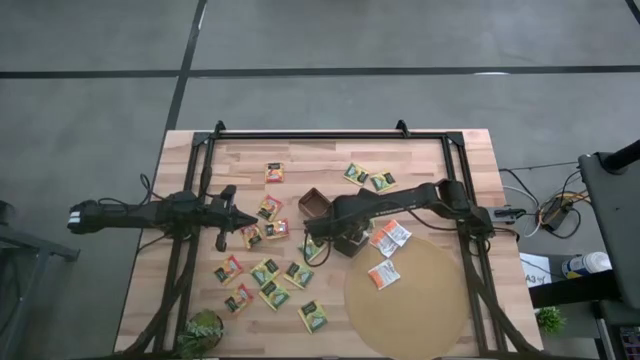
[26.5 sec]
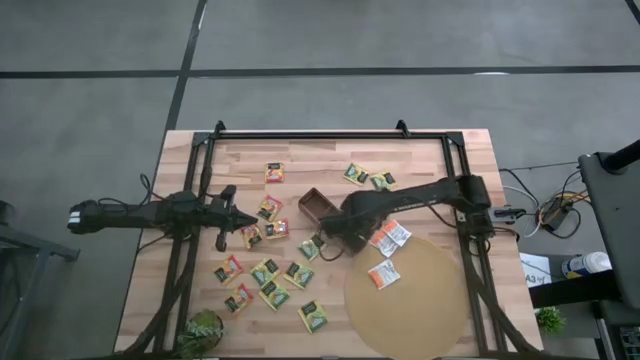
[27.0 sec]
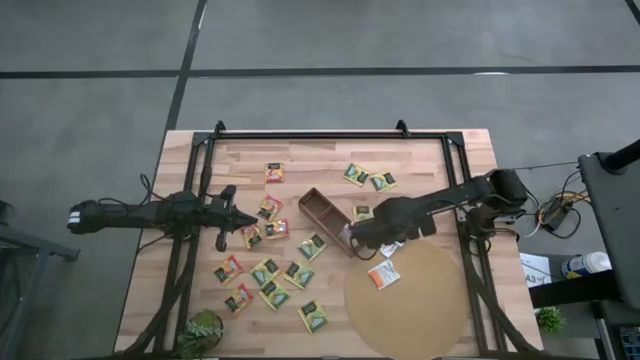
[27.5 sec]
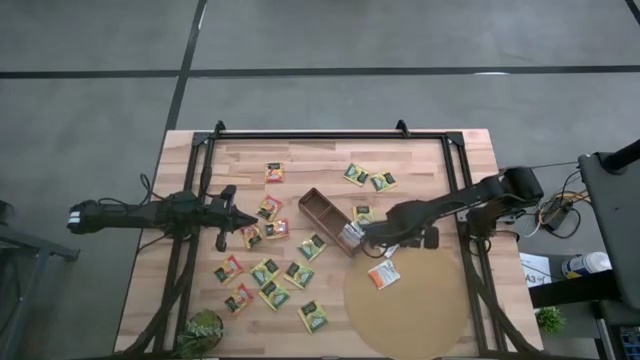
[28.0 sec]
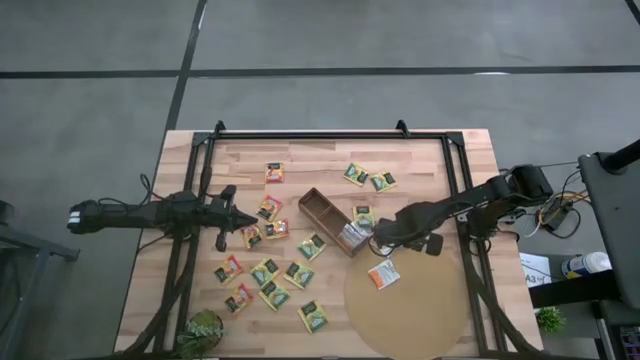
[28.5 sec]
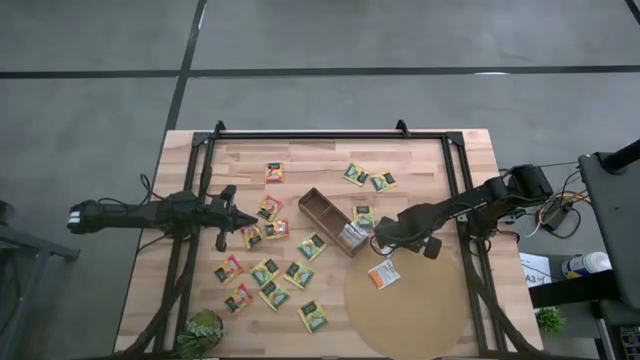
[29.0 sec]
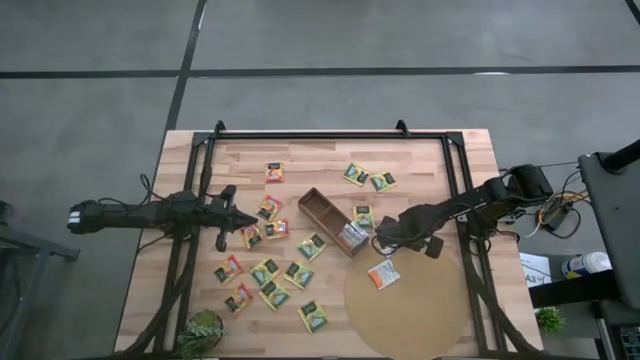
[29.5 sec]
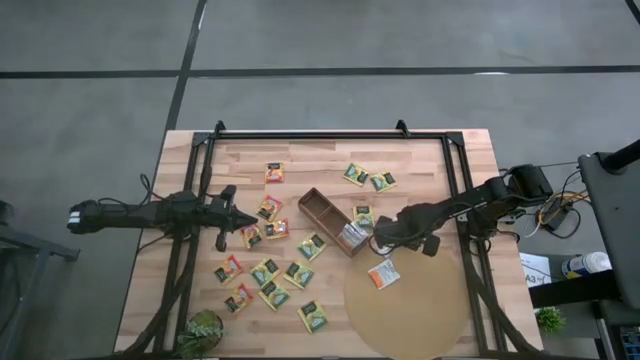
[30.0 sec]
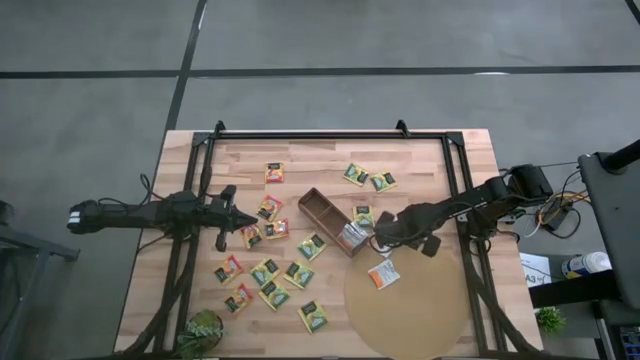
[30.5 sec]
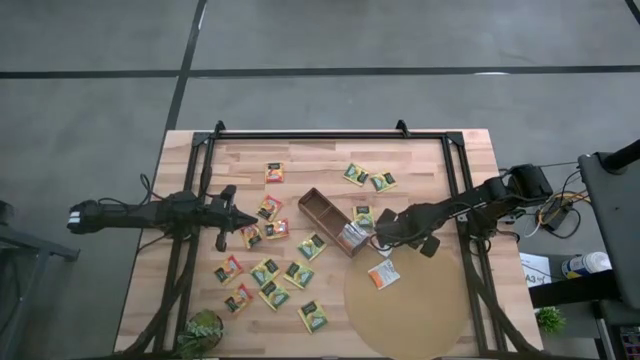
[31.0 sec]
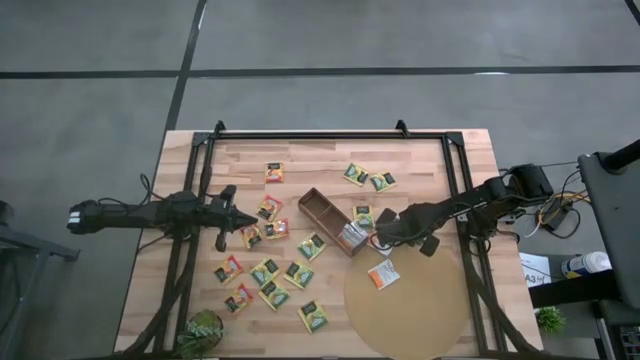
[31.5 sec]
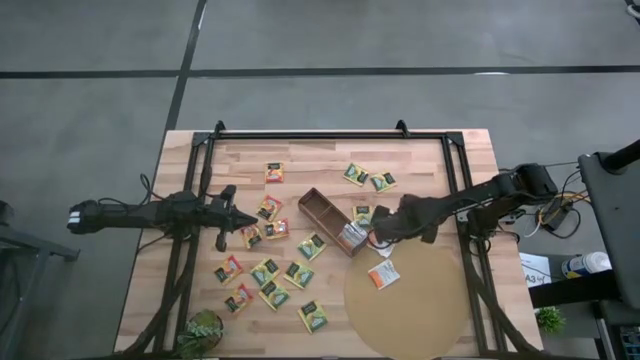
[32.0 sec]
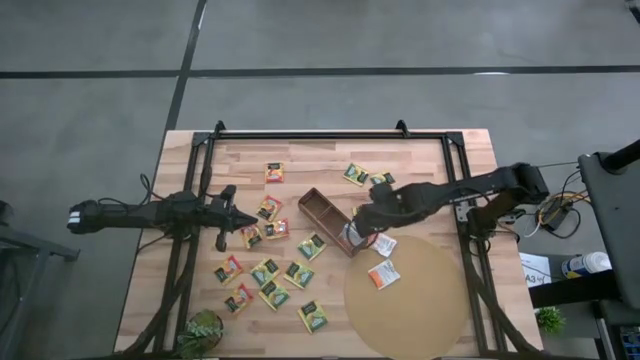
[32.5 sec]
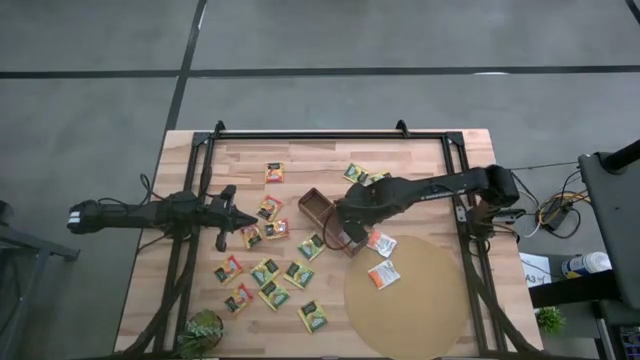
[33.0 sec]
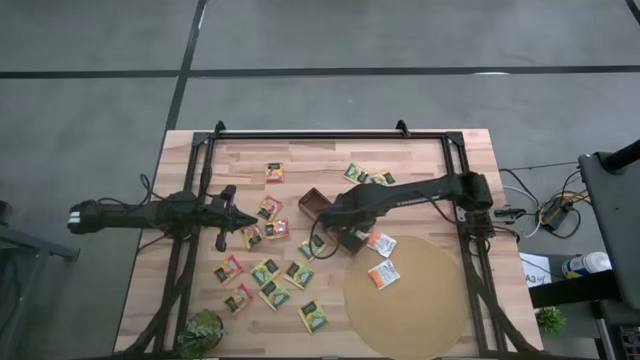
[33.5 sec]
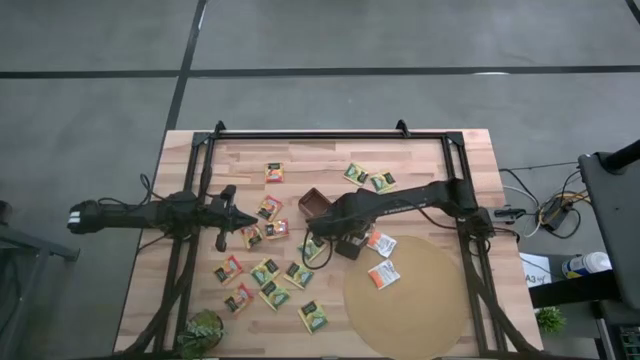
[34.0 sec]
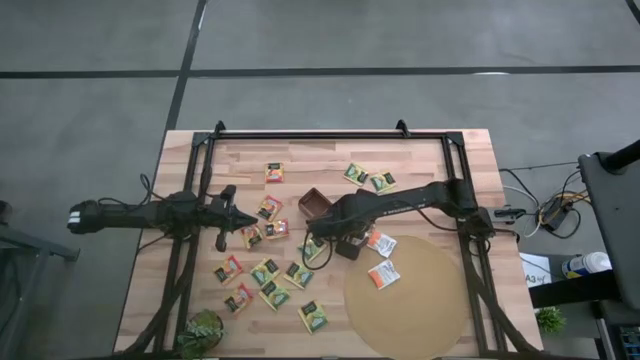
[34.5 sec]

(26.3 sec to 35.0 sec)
Task: Pick & Place Tea
Put the white tea bag into the right section of the wooden organizer

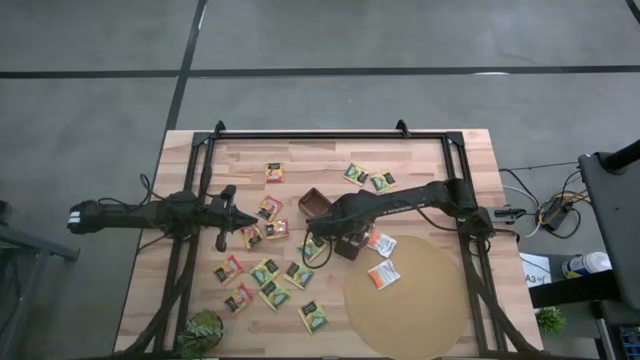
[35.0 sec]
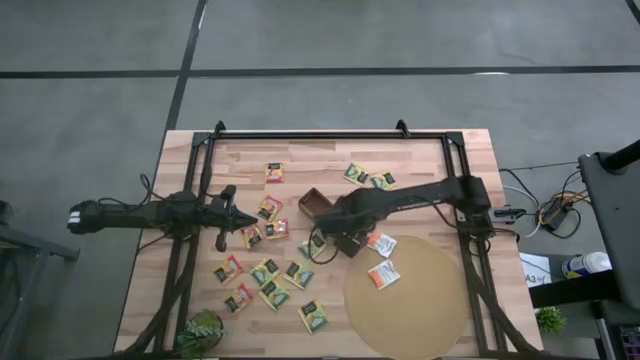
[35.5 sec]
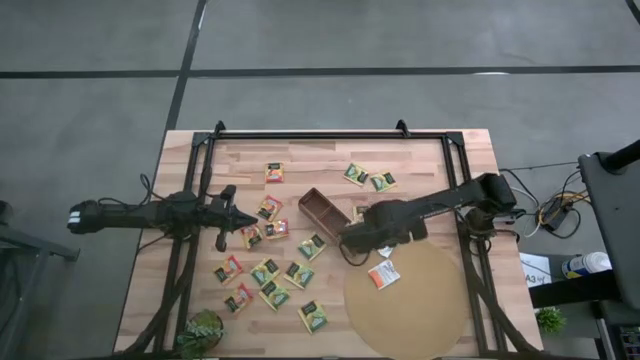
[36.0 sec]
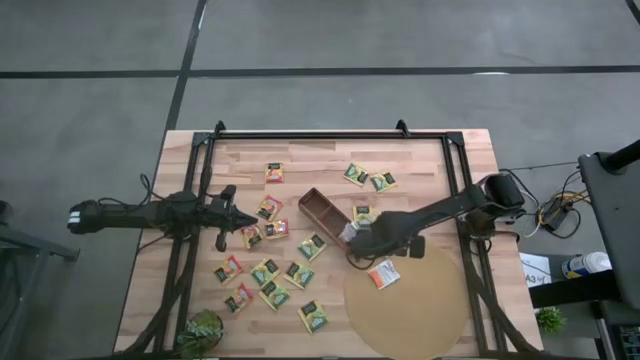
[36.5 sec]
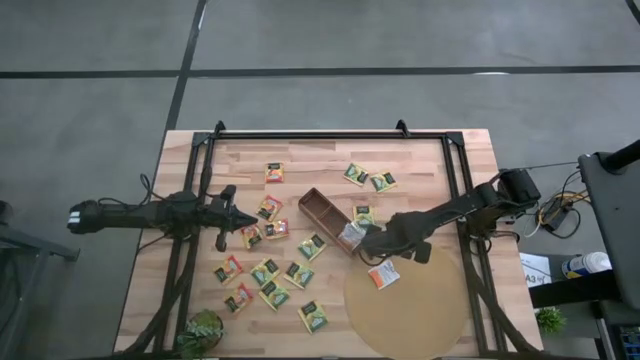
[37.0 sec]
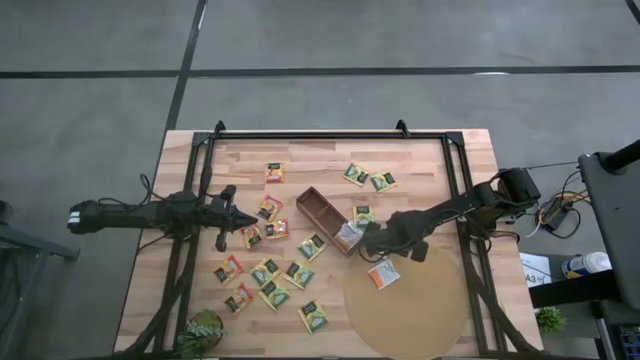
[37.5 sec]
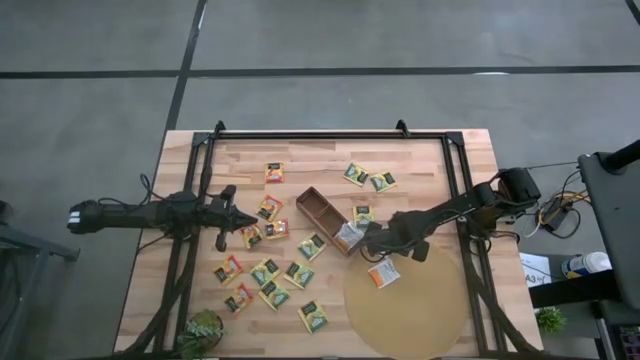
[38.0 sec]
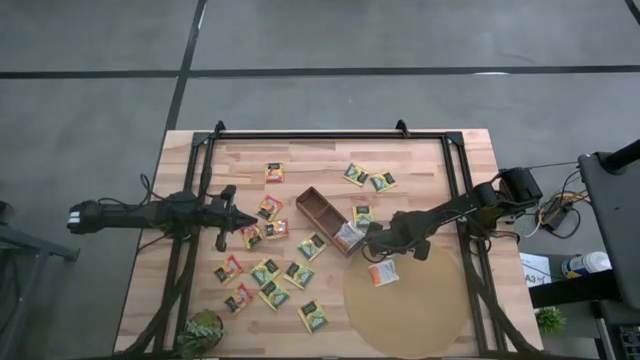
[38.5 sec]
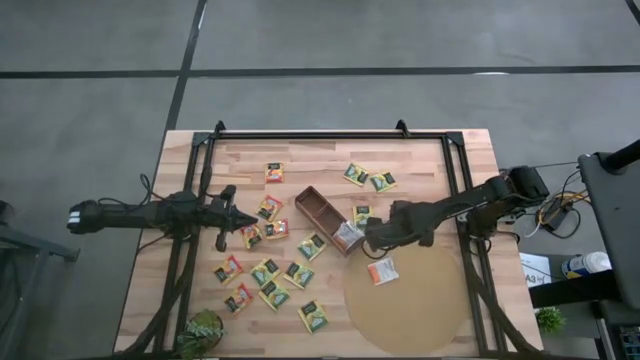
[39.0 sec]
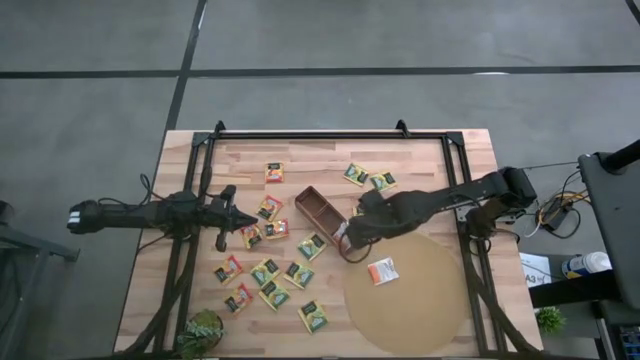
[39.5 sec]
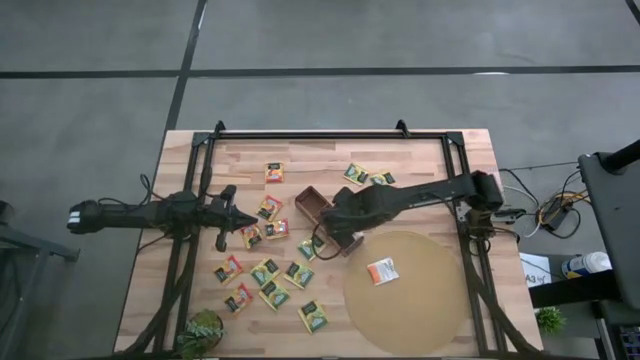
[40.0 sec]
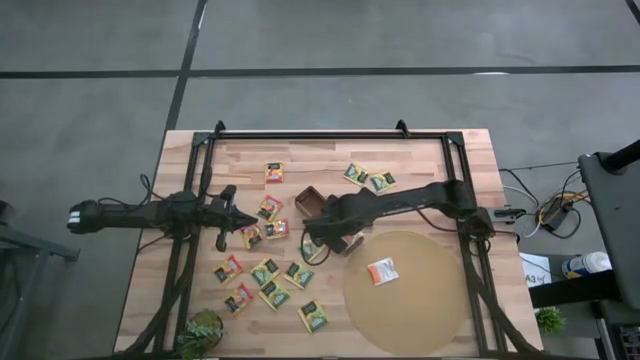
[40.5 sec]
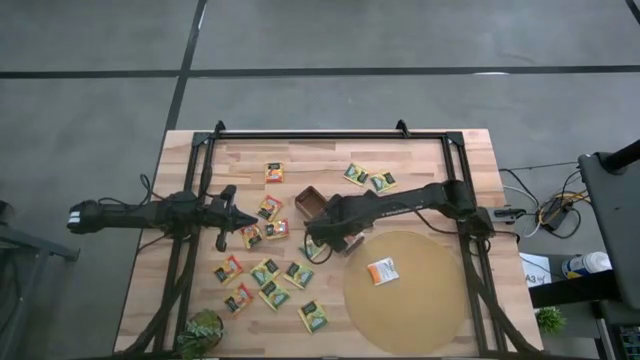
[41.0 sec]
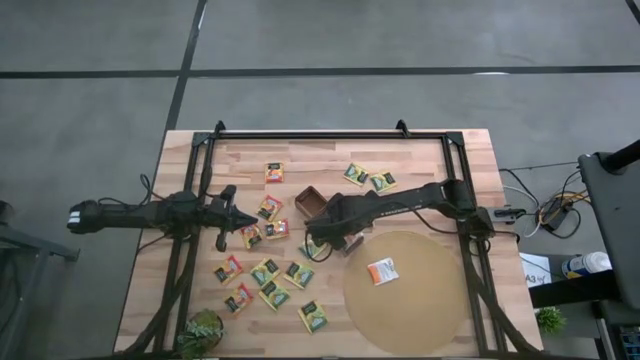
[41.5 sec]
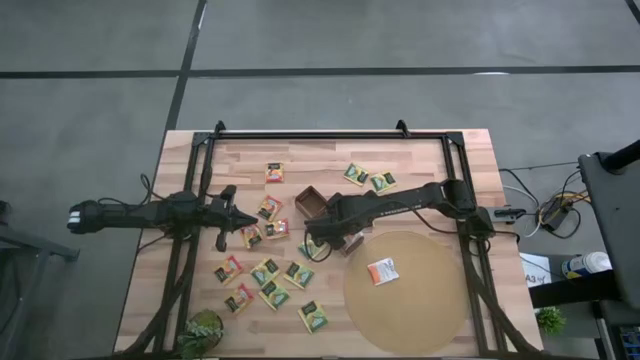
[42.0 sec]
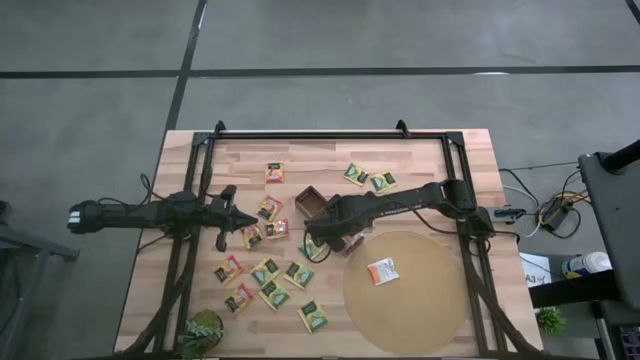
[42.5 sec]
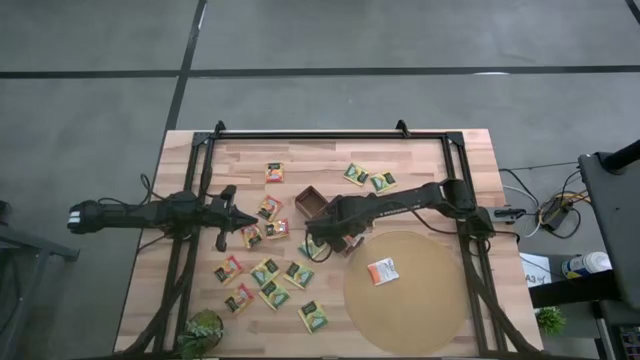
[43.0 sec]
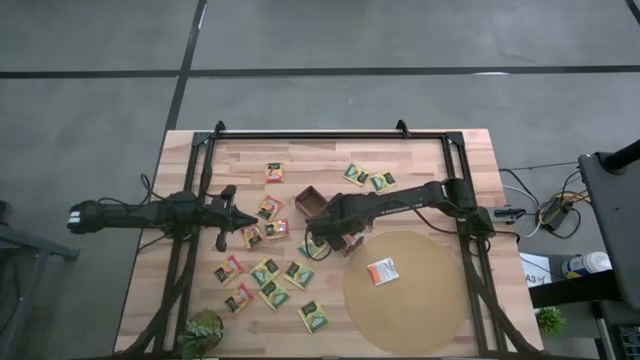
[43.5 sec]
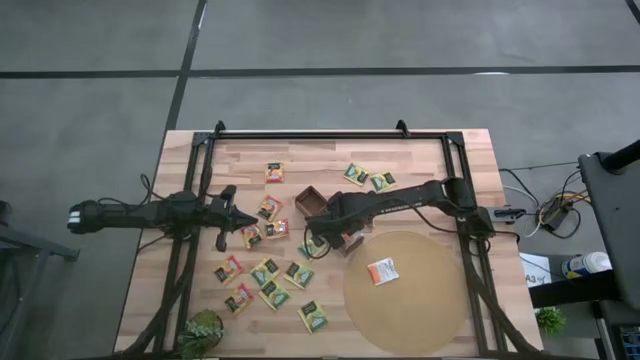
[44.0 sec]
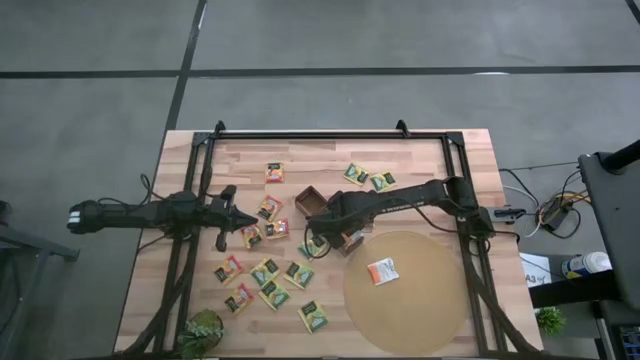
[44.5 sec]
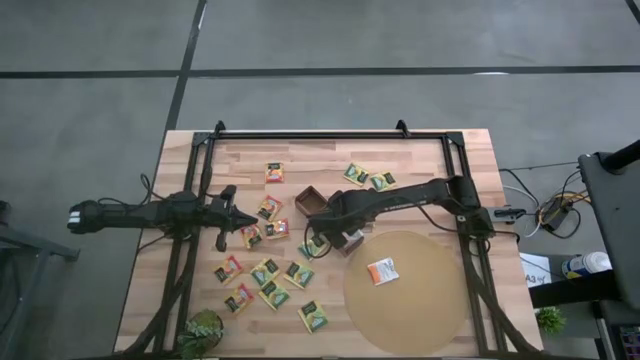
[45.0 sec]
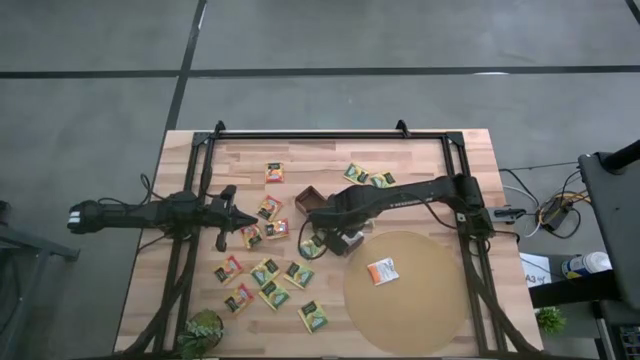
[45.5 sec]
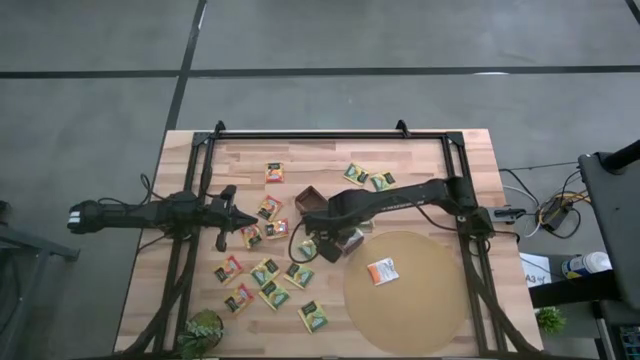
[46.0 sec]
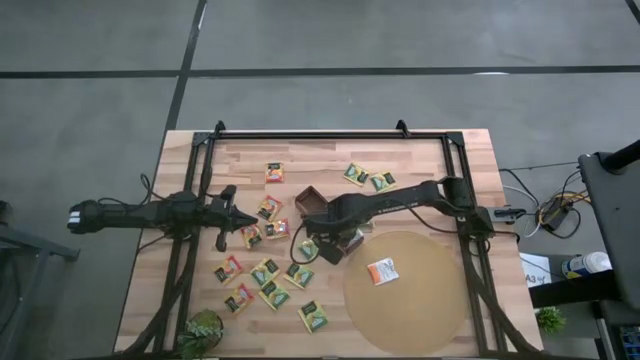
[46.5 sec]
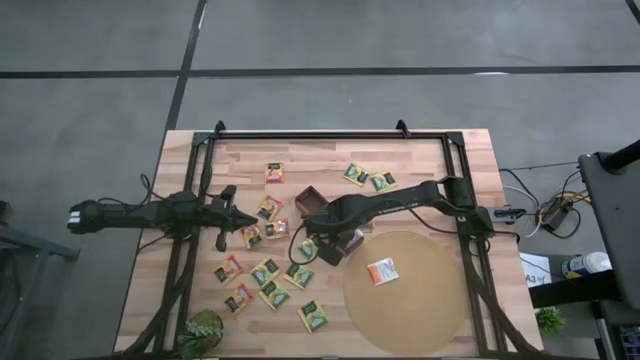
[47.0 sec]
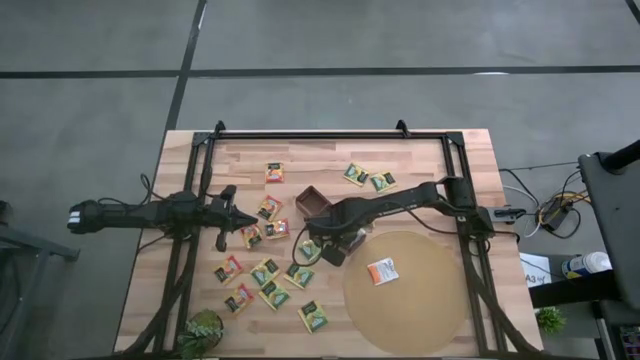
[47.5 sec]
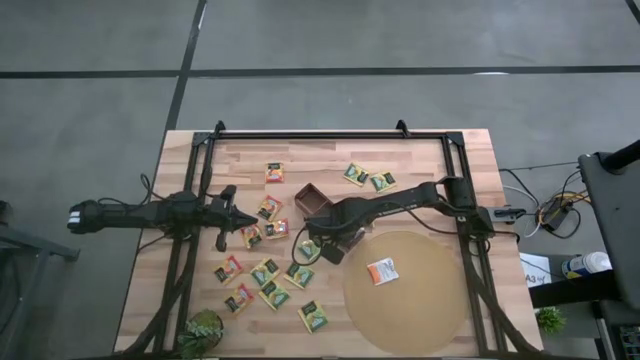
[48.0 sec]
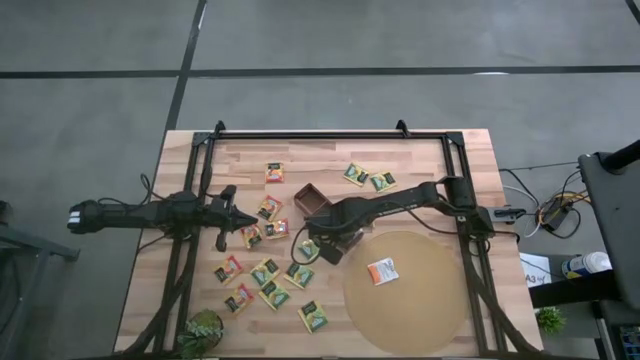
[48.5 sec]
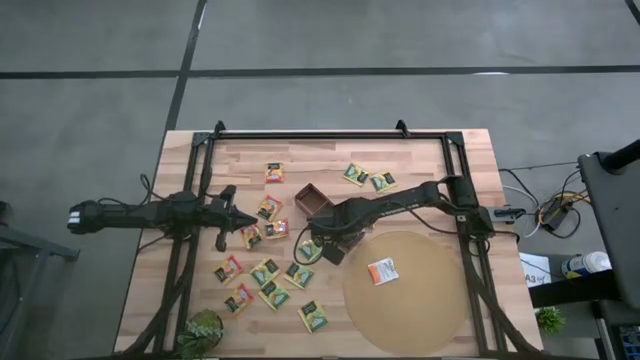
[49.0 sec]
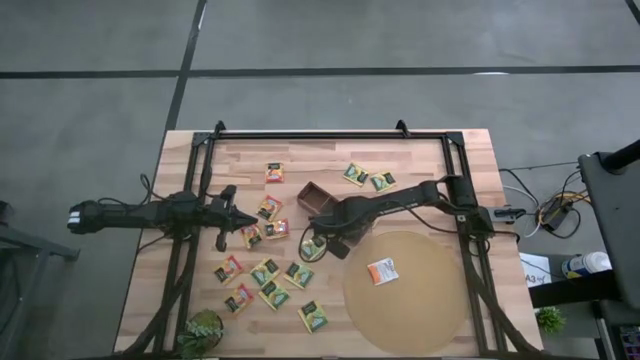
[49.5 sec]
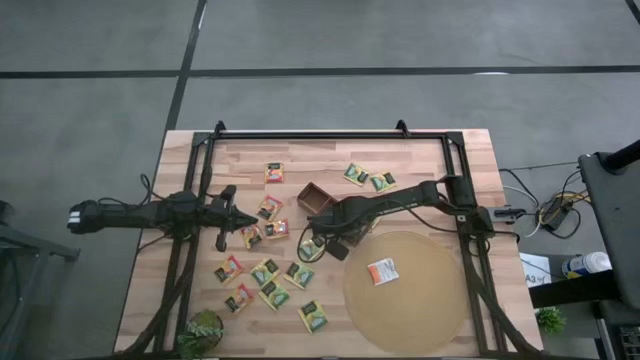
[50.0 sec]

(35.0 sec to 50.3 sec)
Put the white tea bag into the right section of the wooden organizer
